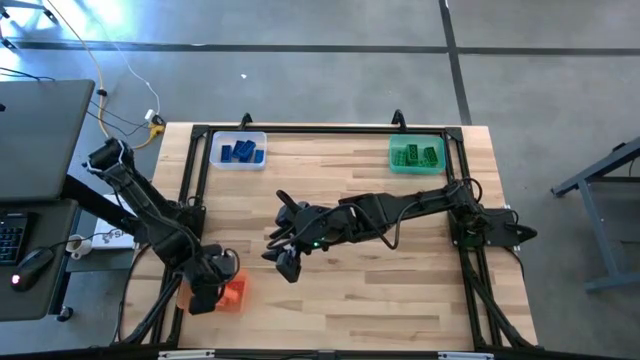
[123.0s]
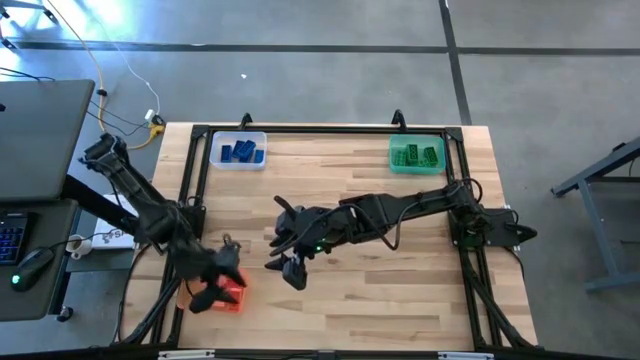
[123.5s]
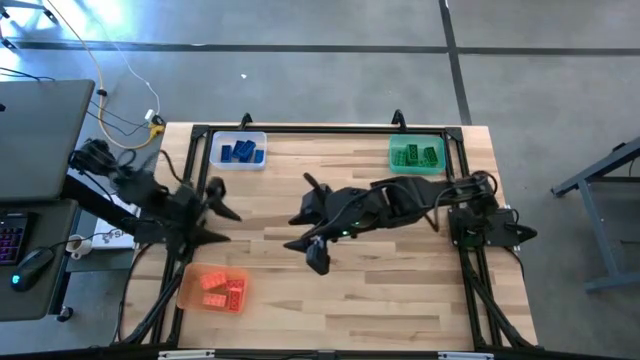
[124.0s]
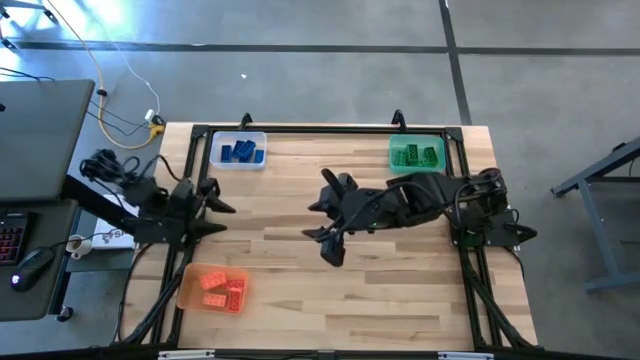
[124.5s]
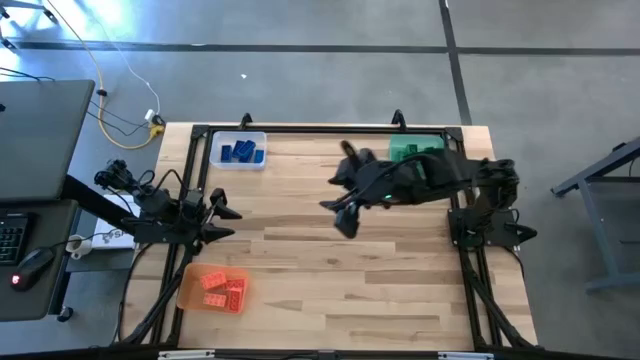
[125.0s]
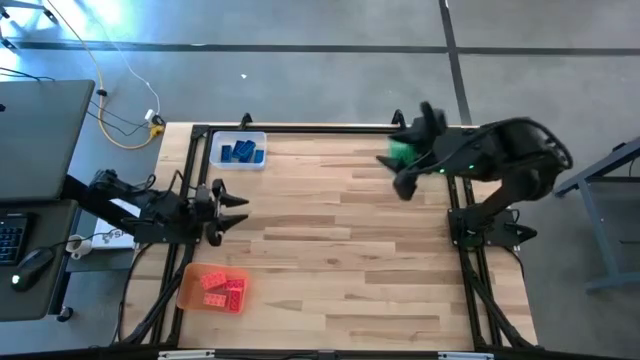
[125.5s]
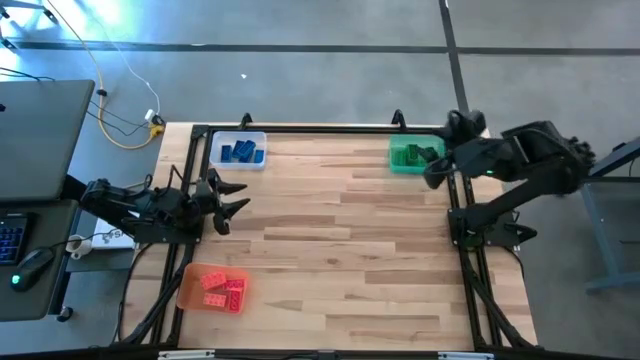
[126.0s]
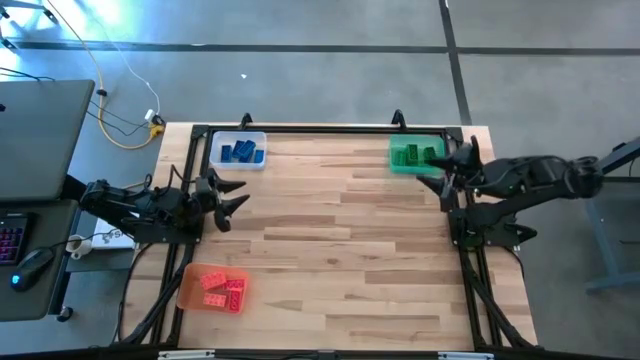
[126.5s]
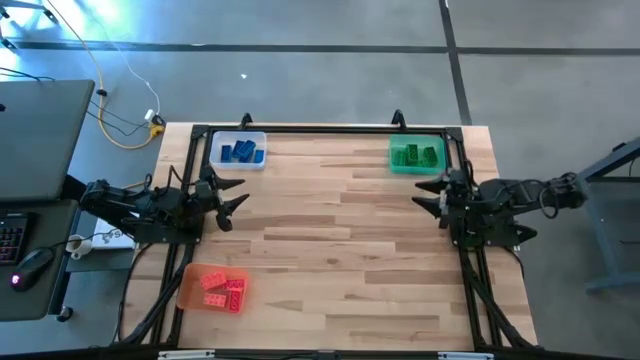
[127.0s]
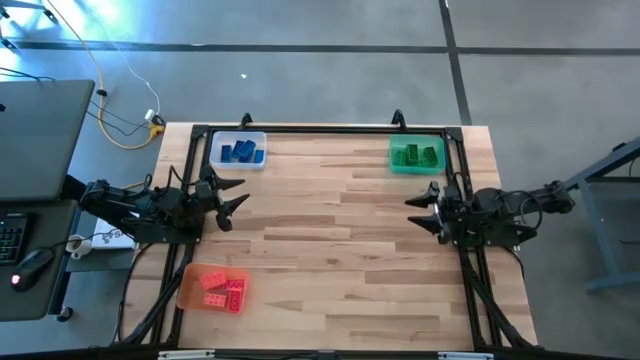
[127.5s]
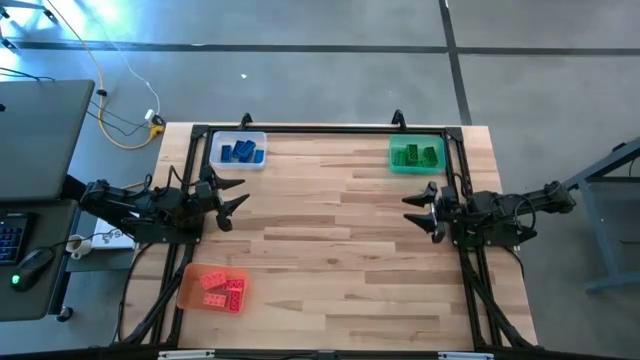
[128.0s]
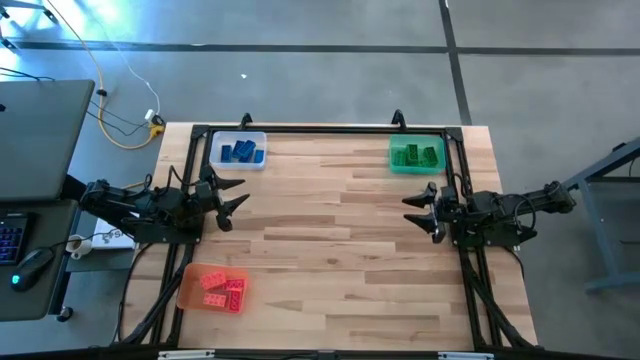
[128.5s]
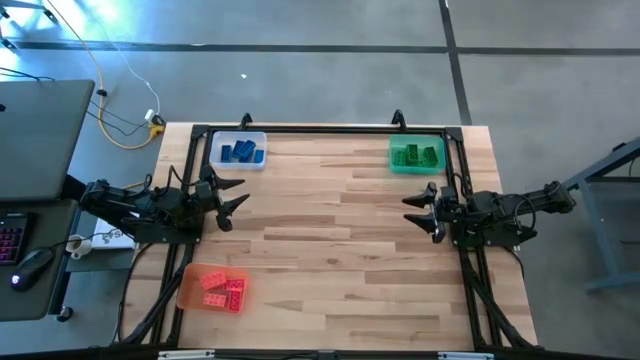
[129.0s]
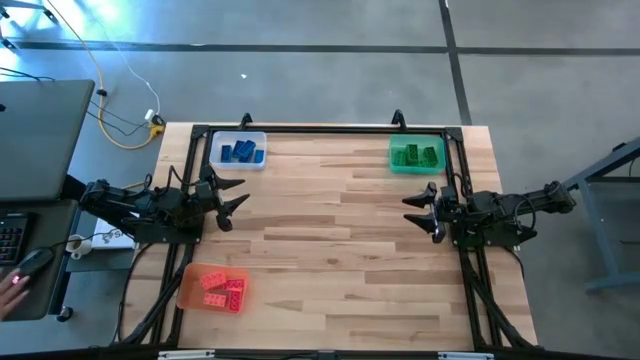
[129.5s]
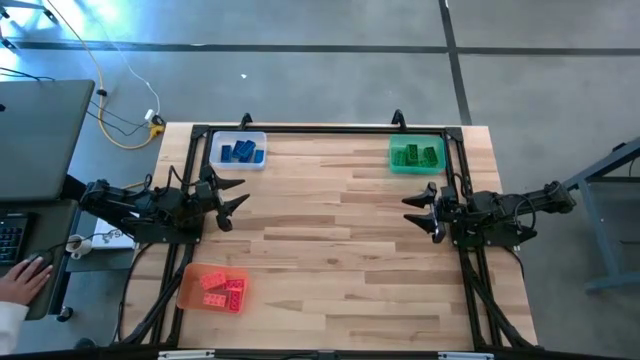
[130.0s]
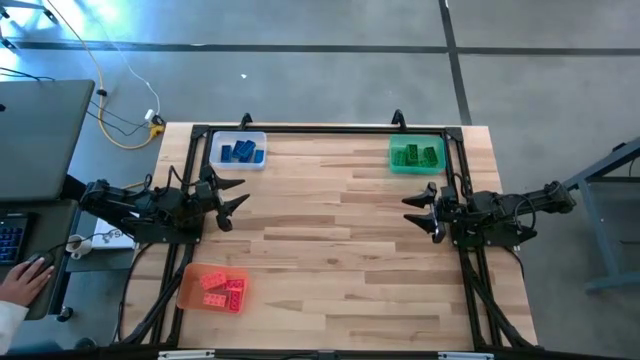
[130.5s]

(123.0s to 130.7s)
Task: Sort & place blocks by color
Return to Home Position

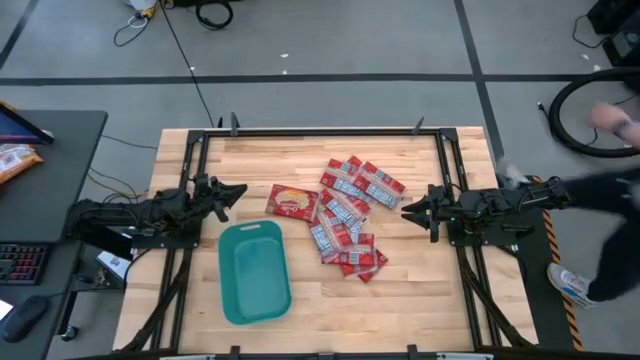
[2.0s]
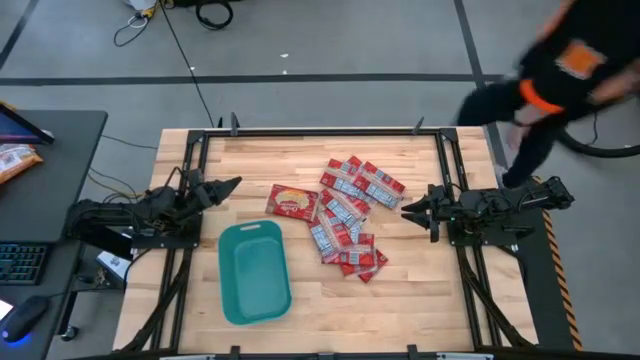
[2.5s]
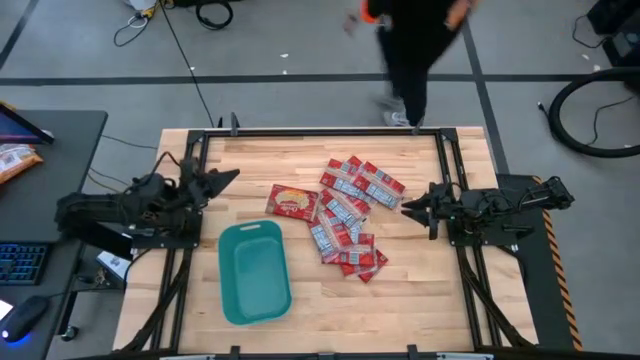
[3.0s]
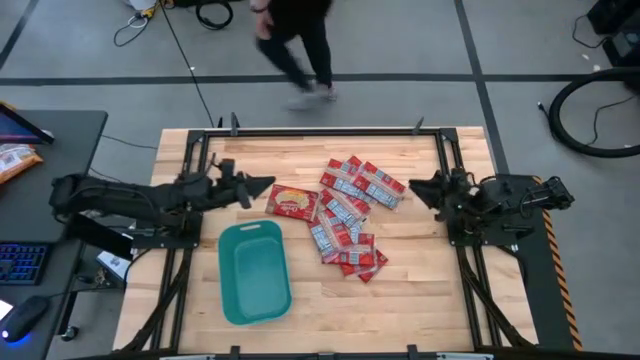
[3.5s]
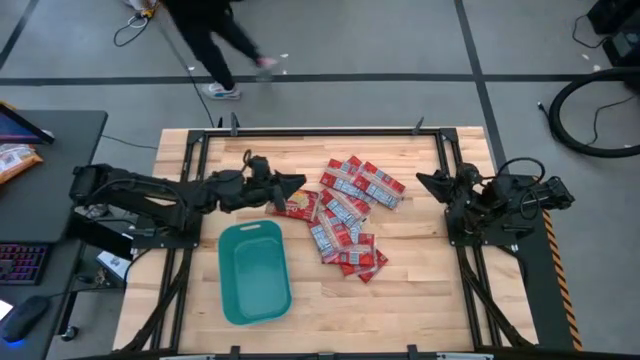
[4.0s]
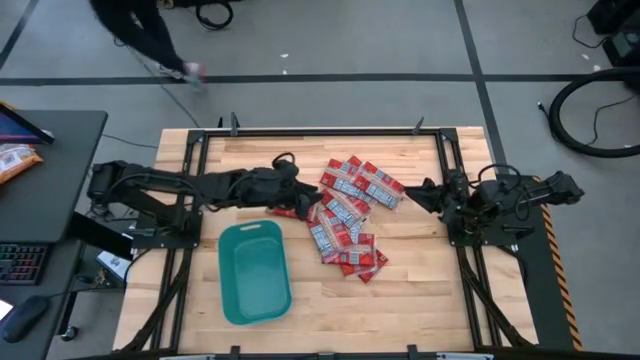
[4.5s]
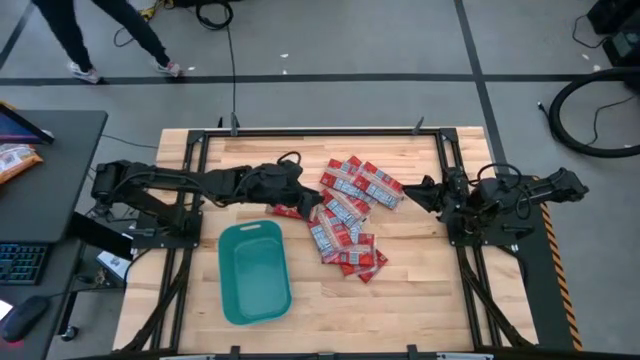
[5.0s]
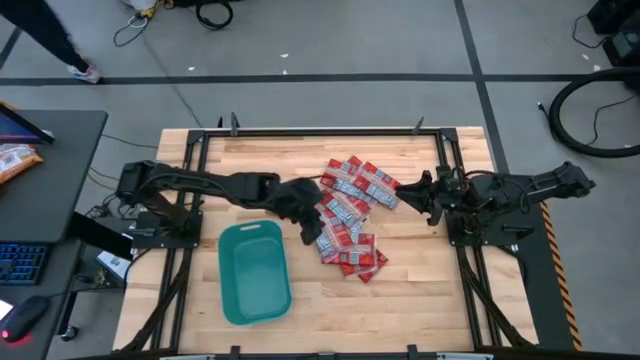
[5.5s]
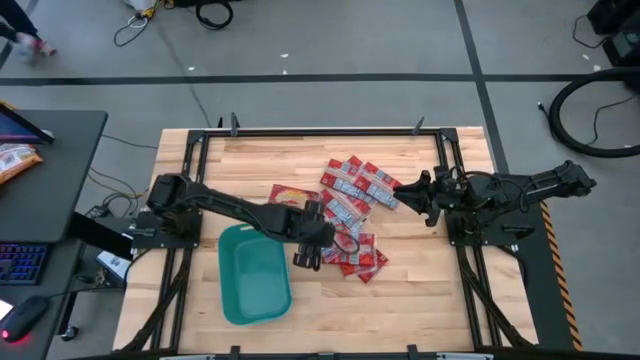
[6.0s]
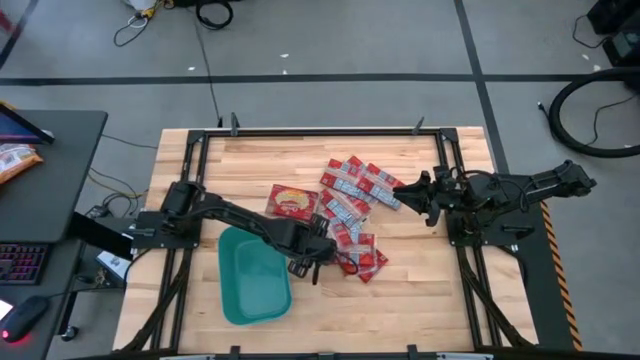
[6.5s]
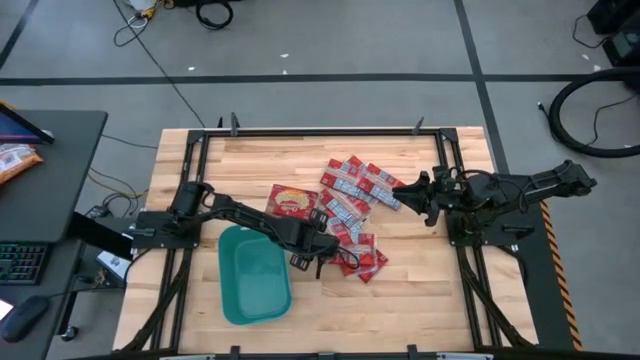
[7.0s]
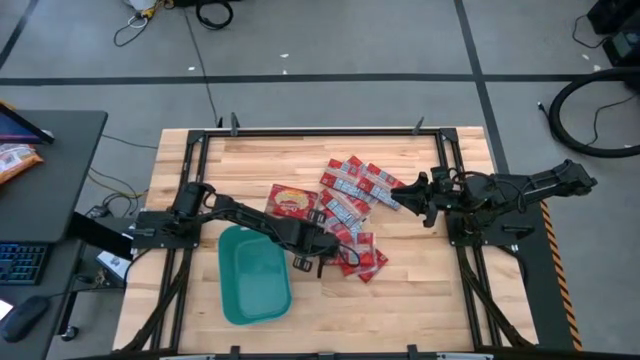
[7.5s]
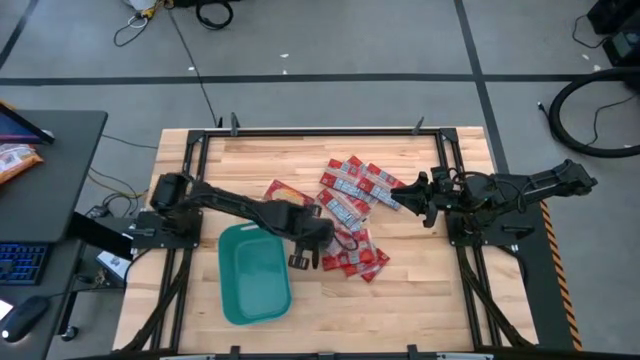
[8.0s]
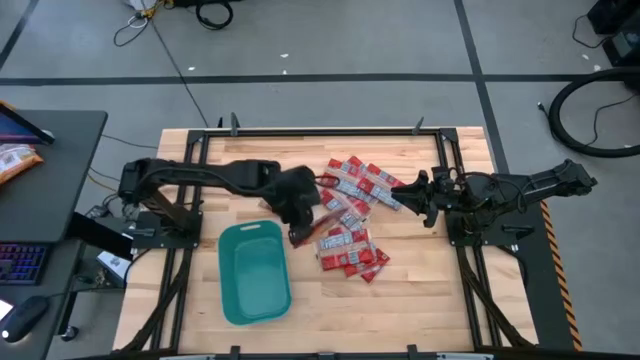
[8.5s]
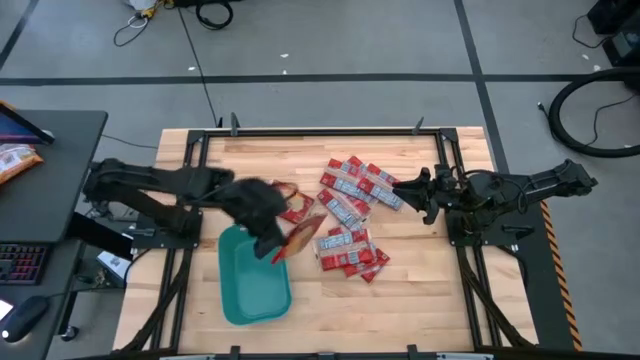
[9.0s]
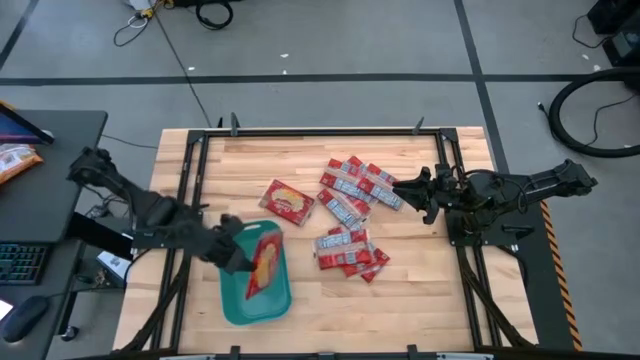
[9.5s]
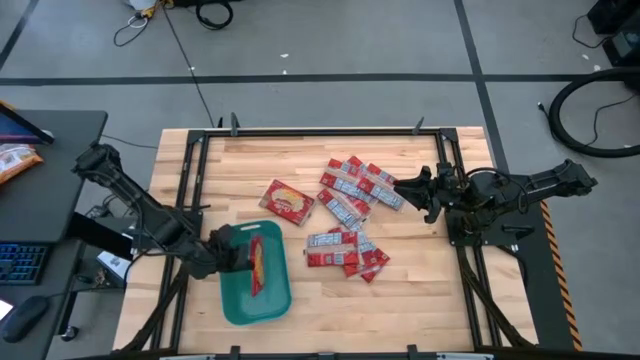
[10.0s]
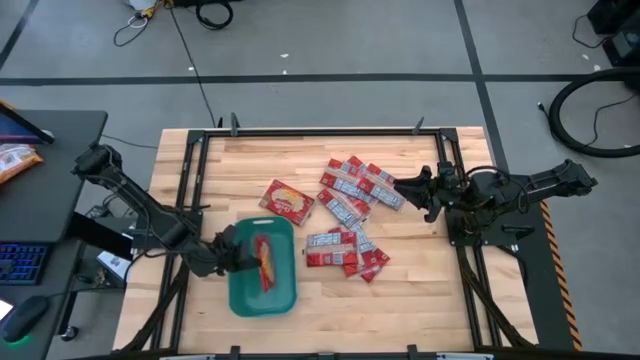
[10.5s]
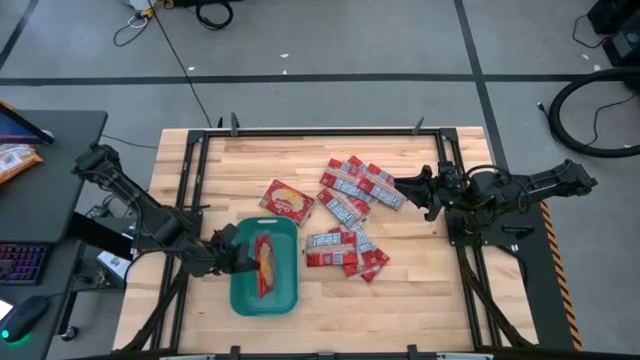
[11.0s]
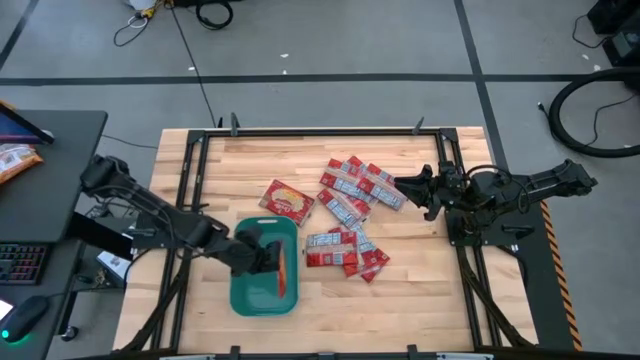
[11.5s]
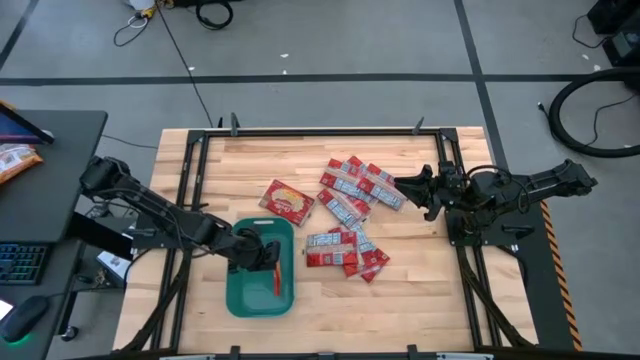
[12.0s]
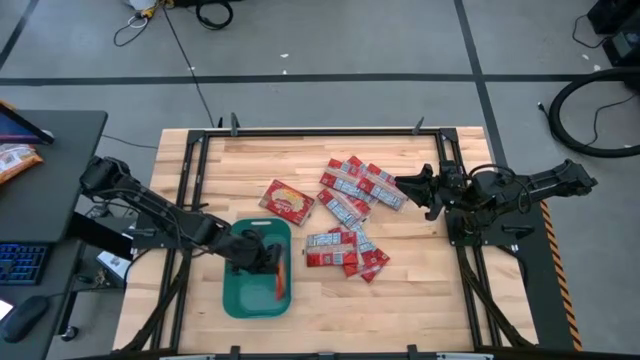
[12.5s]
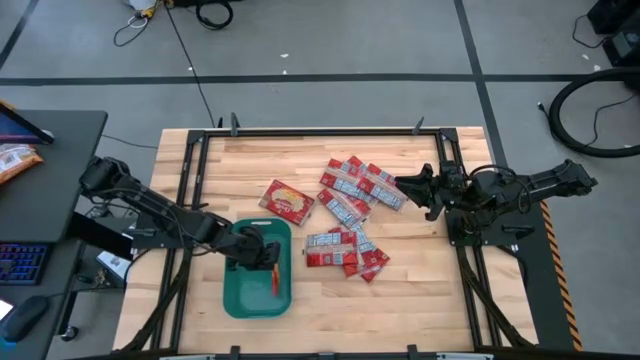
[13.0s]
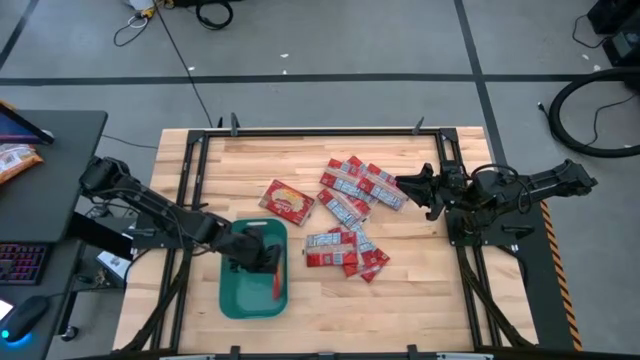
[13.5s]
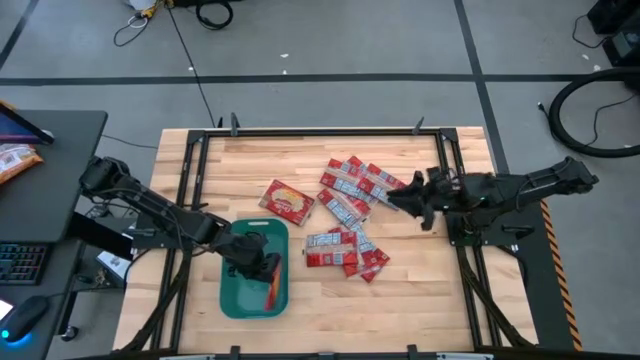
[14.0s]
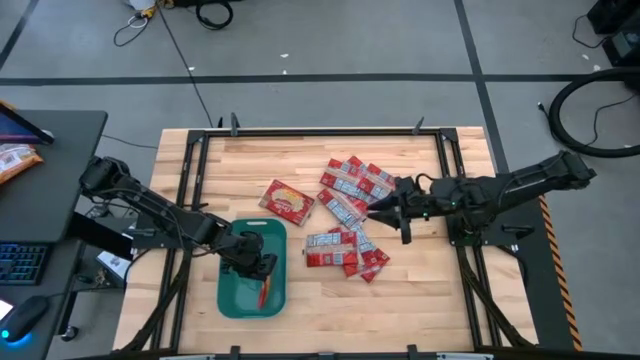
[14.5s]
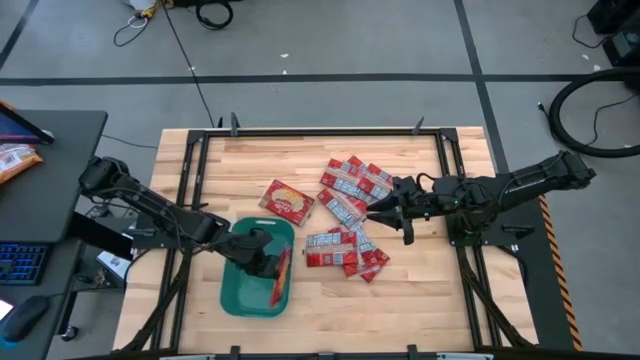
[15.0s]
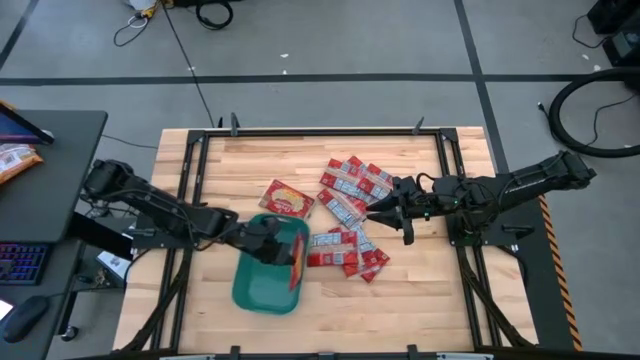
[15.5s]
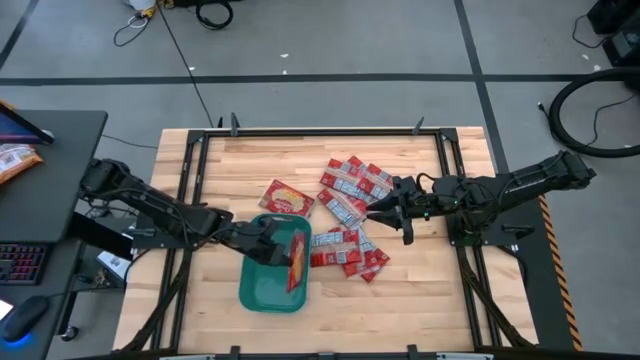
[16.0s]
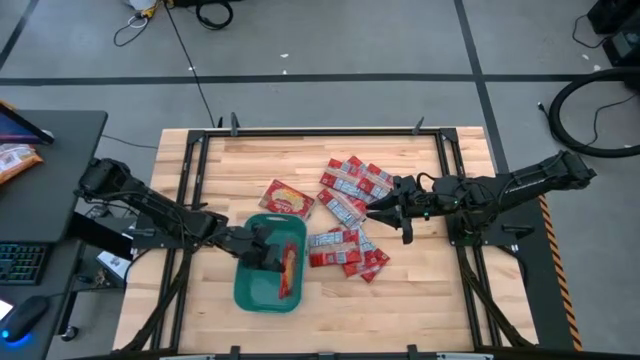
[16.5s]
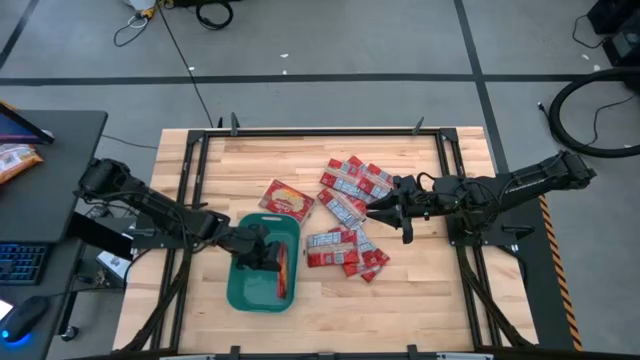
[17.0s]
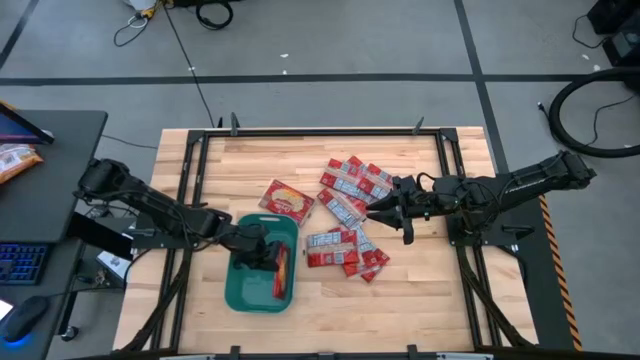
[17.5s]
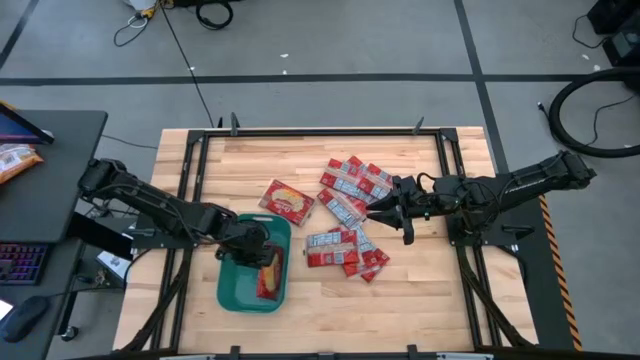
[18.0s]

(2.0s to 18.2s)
Task: Sort popcorn bags into baskets
Put the red popcorn bag into the green bin
